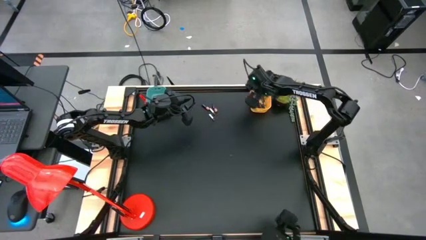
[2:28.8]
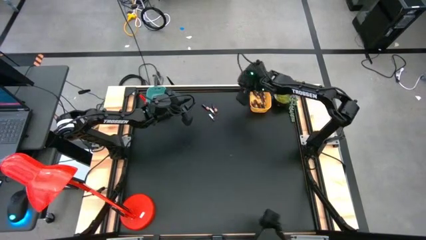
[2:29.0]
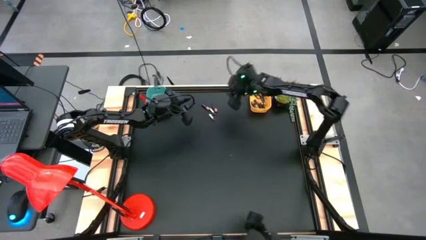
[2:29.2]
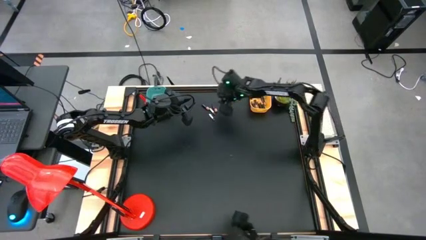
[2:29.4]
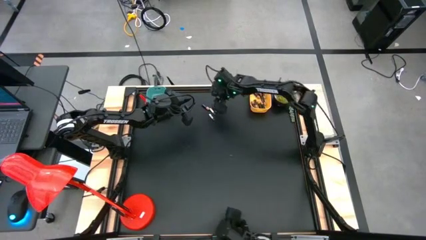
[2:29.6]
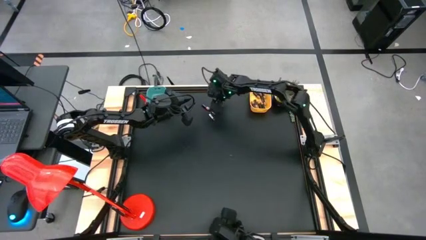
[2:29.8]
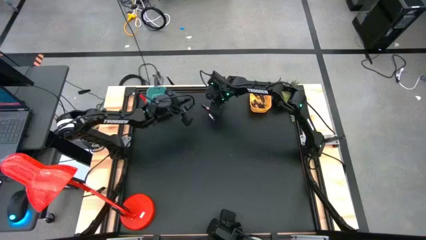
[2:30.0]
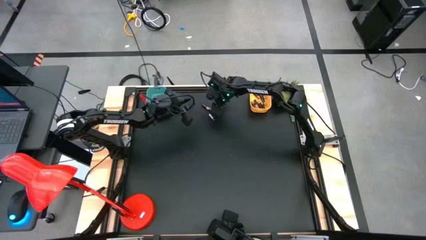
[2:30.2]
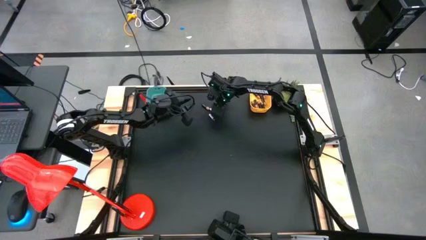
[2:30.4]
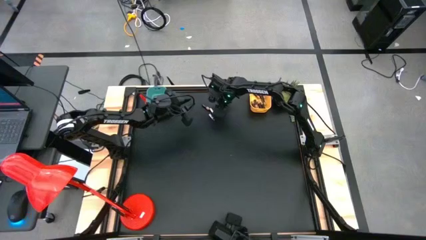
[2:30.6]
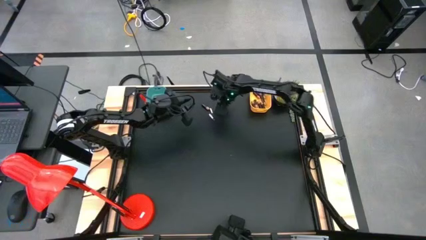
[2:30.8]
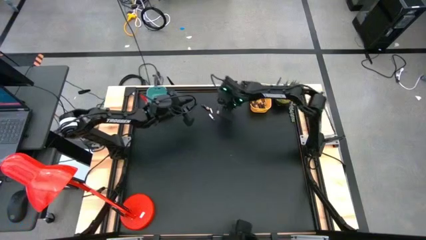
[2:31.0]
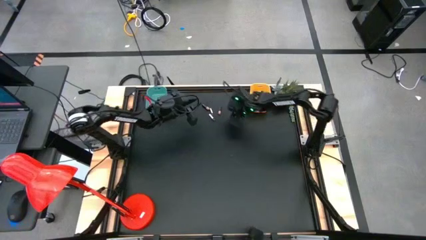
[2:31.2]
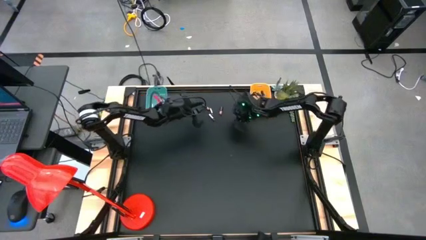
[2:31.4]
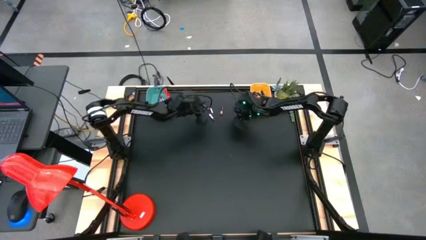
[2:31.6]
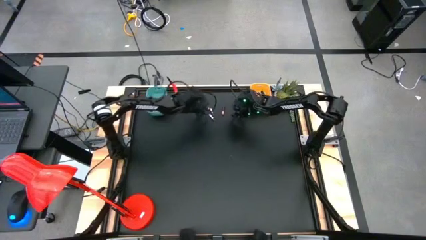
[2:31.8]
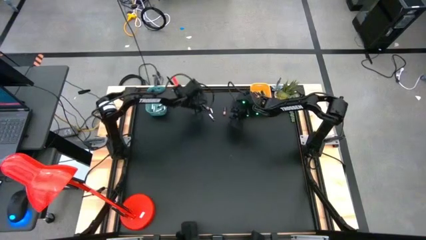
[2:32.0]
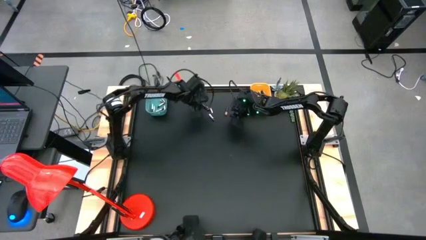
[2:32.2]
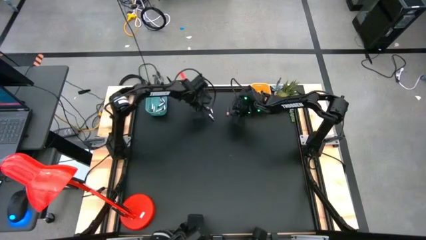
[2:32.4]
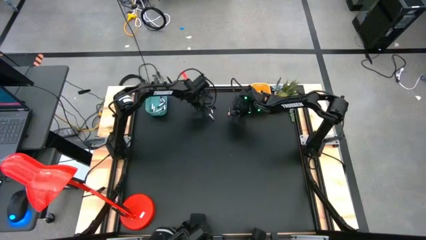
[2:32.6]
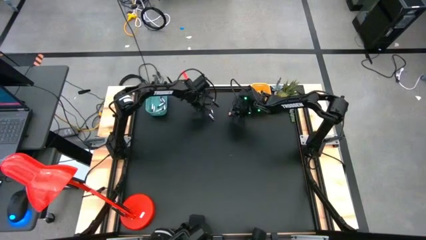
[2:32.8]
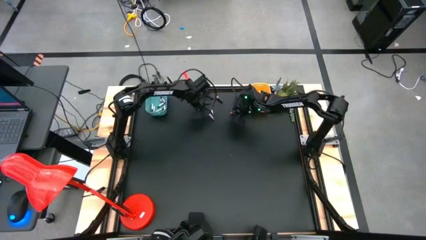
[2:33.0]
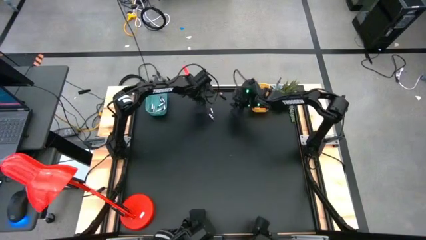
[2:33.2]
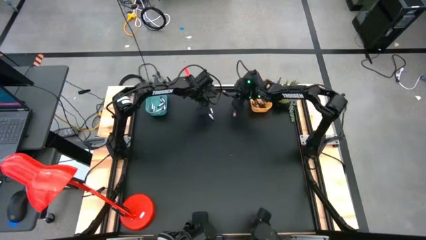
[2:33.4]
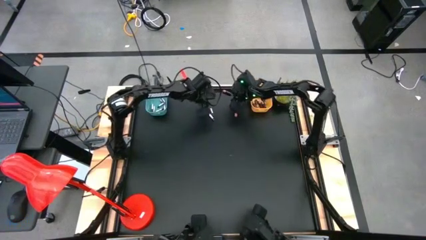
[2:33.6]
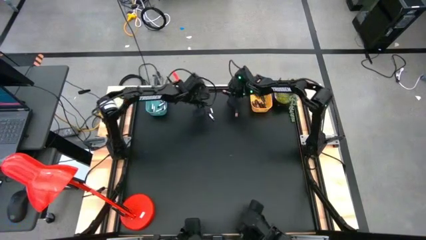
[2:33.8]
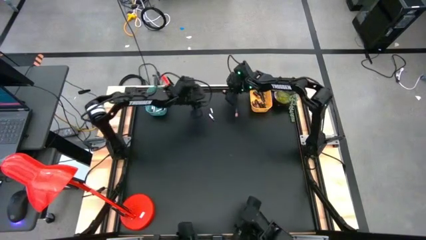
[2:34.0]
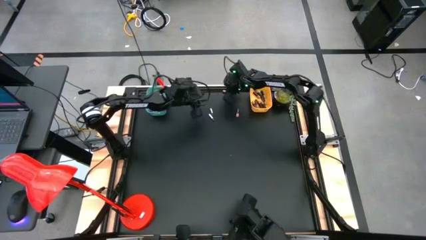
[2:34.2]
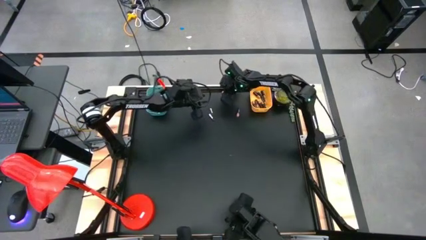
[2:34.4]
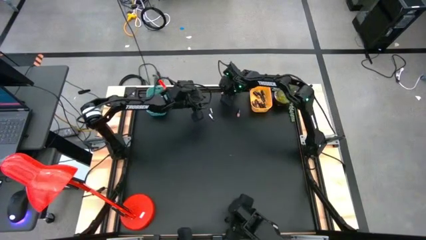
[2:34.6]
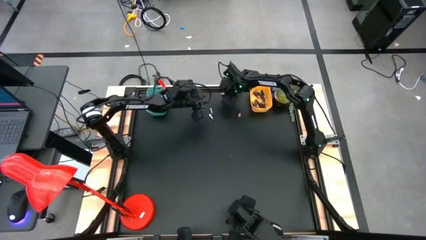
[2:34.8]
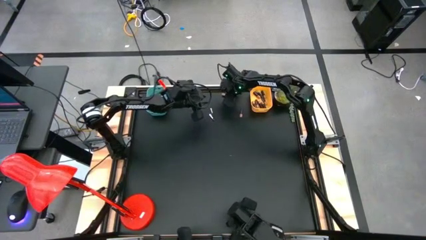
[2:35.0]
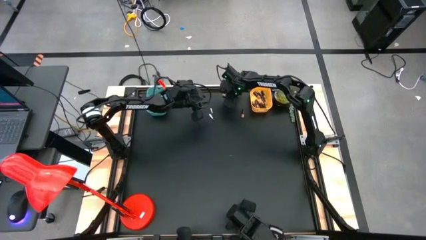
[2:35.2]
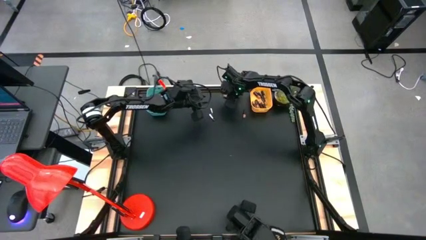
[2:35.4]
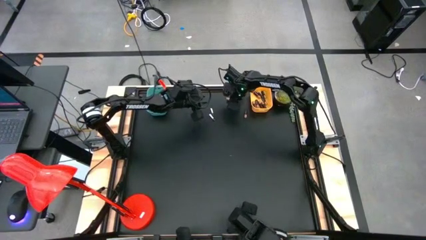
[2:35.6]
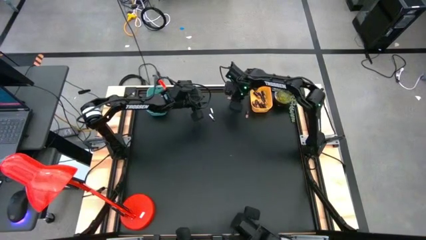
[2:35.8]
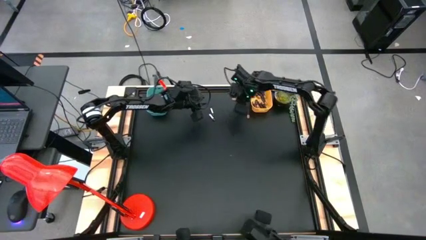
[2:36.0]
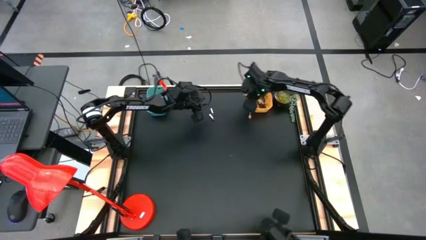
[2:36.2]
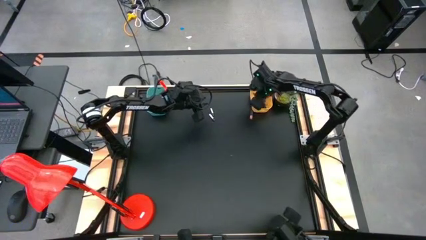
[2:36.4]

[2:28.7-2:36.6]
Task: Sort batteries
Put the black battery into the yellow bin

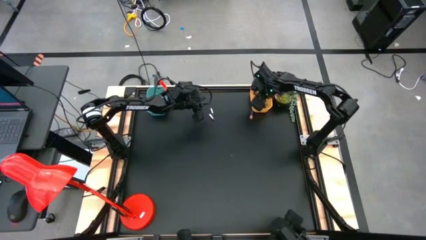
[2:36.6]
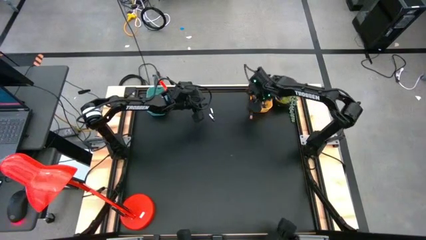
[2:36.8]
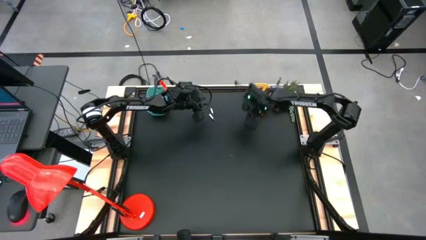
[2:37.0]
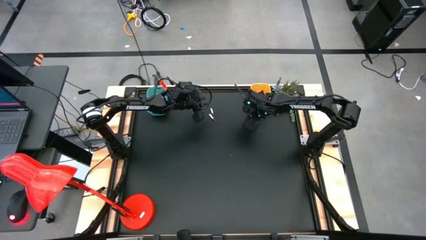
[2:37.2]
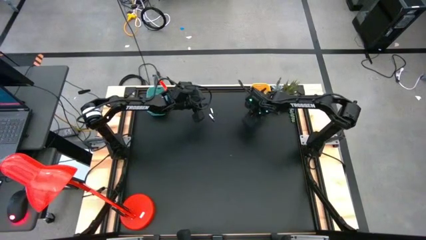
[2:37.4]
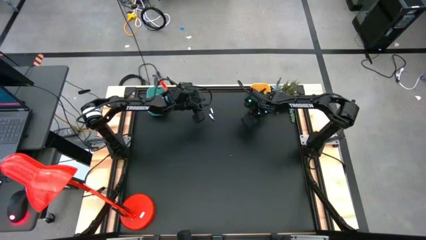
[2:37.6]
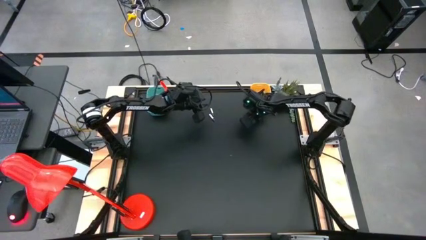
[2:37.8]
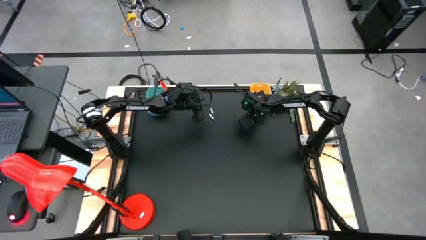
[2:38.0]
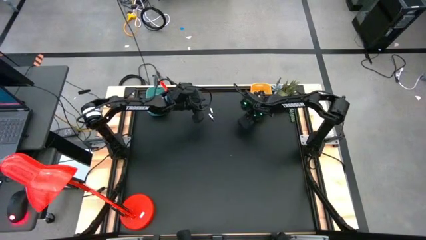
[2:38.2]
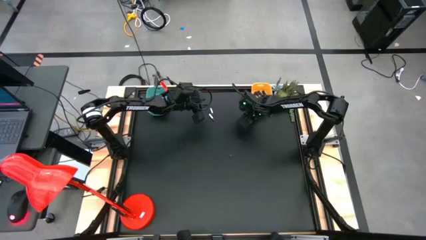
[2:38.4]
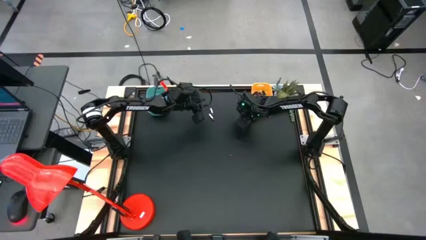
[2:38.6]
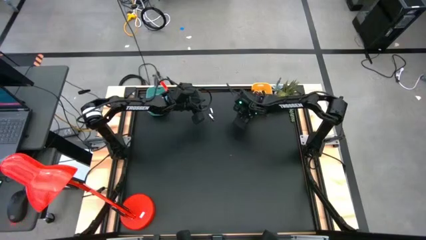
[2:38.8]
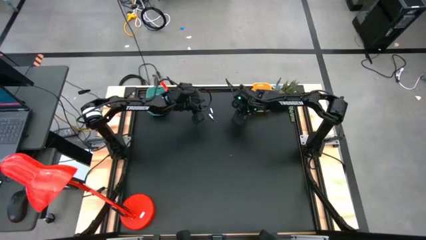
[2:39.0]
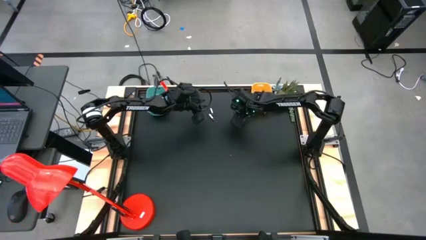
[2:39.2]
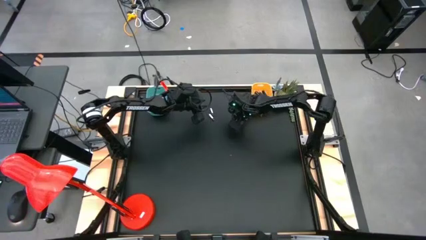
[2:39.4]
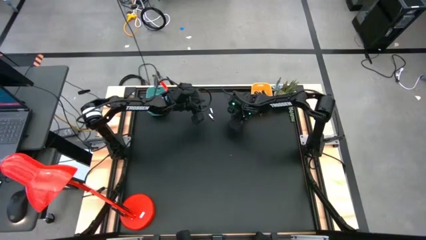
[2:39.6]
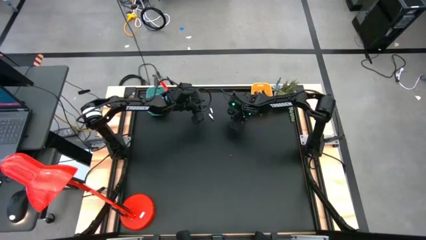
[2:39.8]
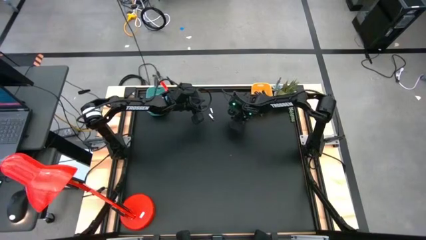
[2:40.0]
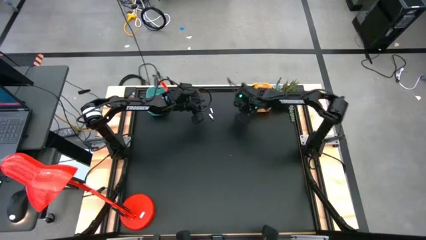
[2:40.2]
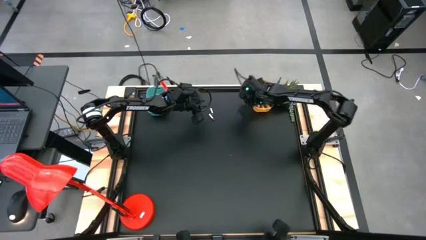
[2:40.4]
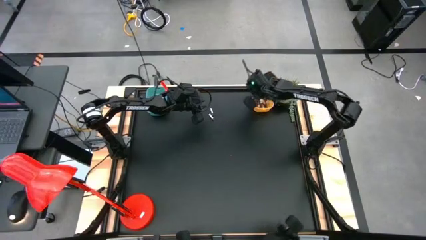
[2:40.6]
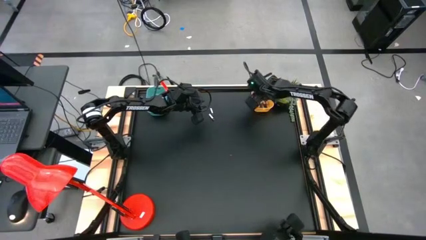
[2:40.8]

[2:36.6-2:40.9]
Put the black battery into the yellow bin
